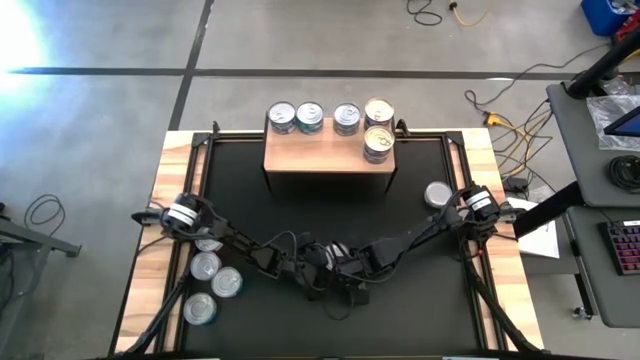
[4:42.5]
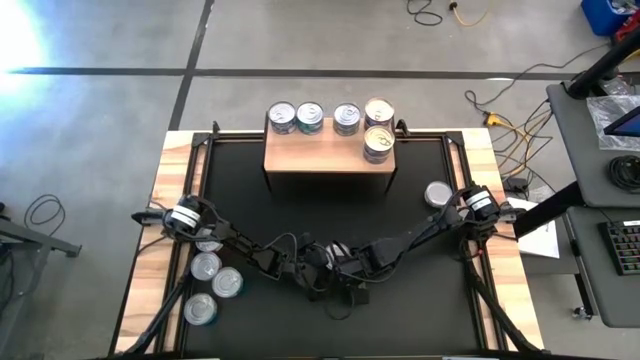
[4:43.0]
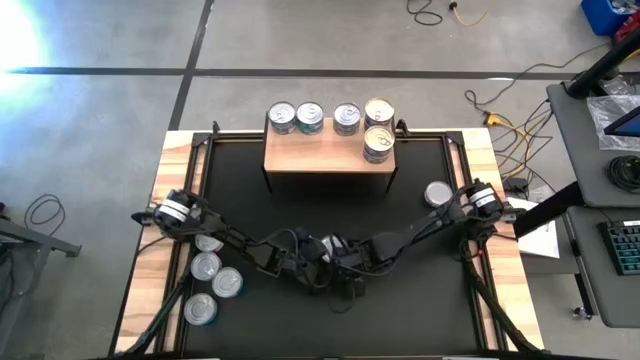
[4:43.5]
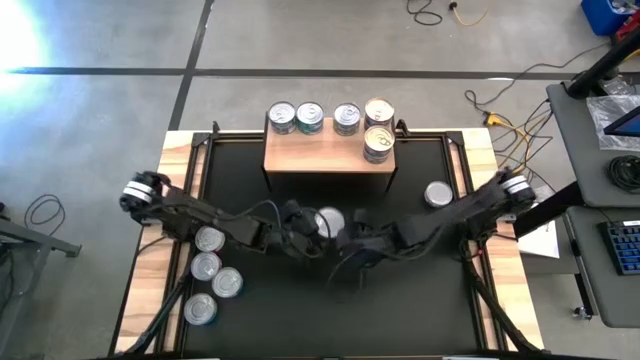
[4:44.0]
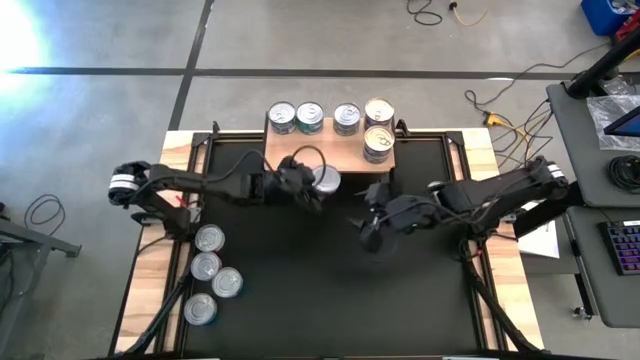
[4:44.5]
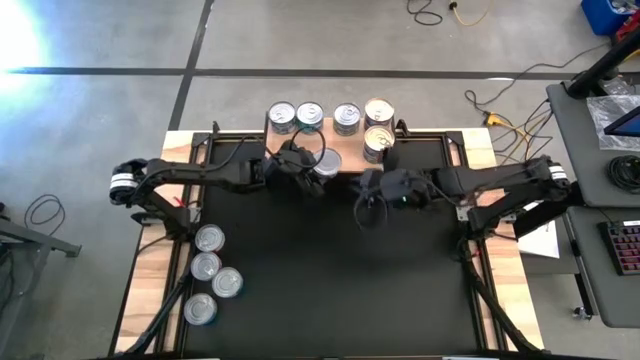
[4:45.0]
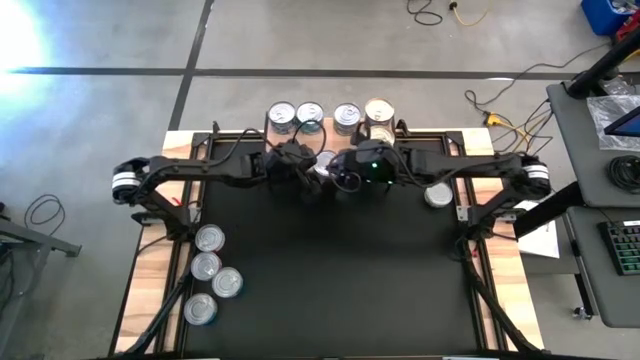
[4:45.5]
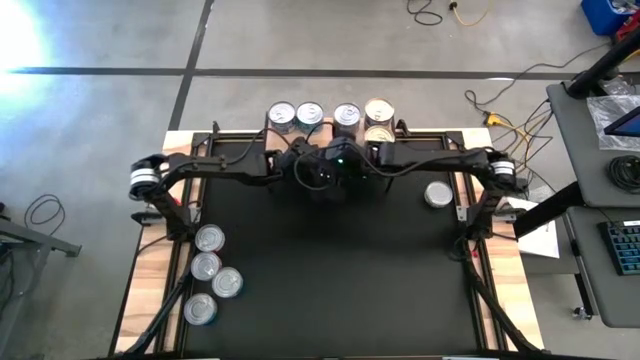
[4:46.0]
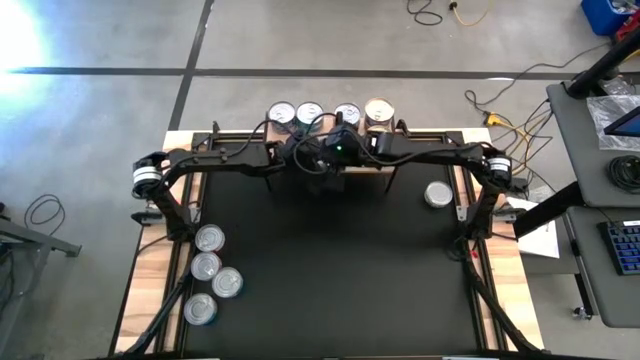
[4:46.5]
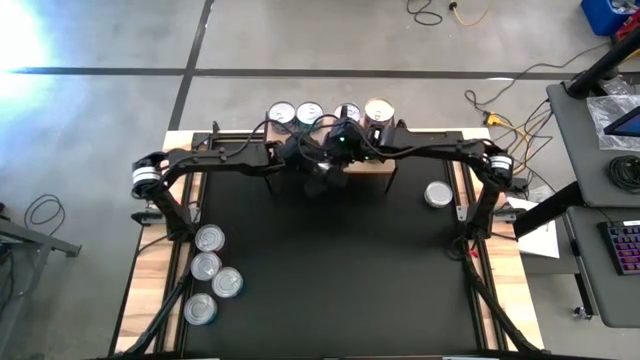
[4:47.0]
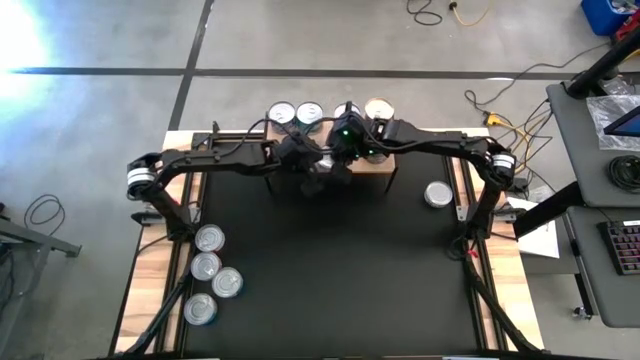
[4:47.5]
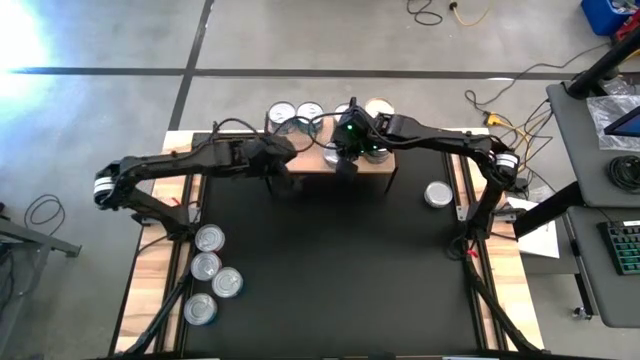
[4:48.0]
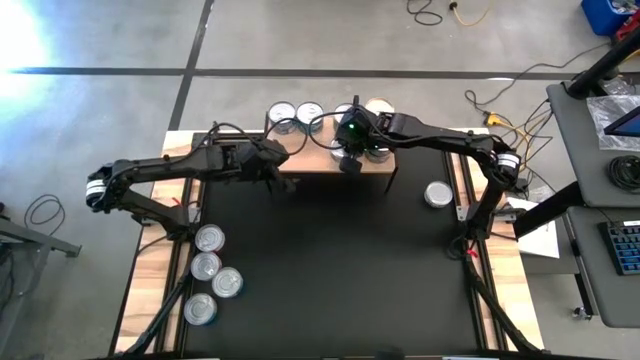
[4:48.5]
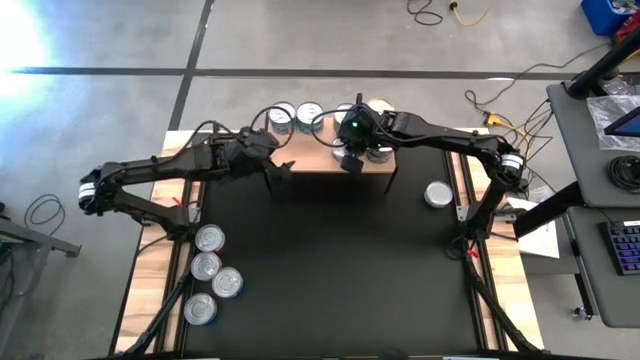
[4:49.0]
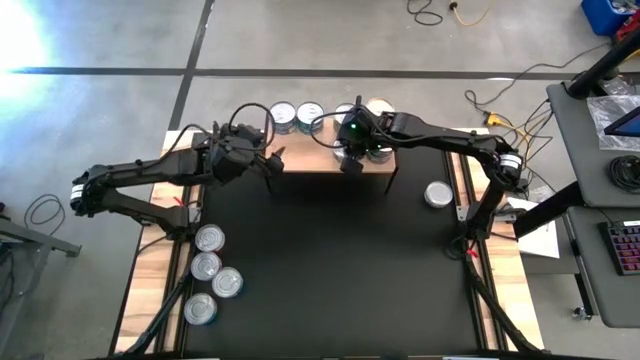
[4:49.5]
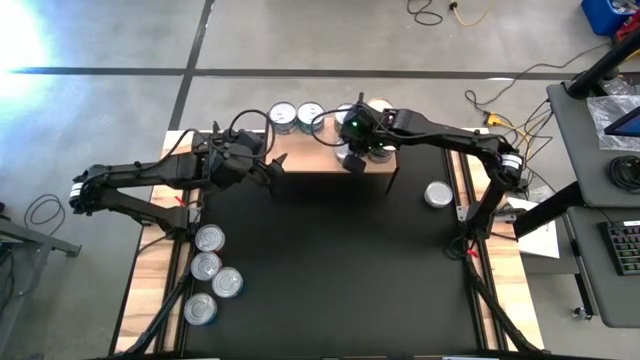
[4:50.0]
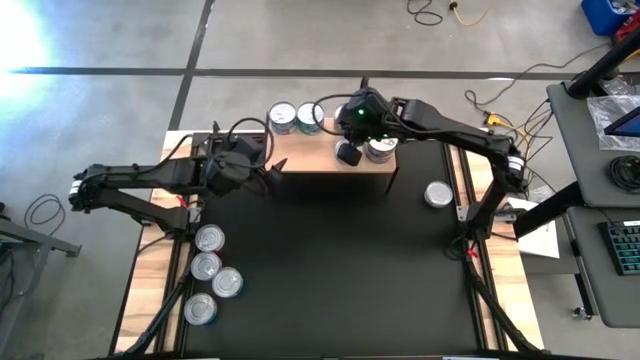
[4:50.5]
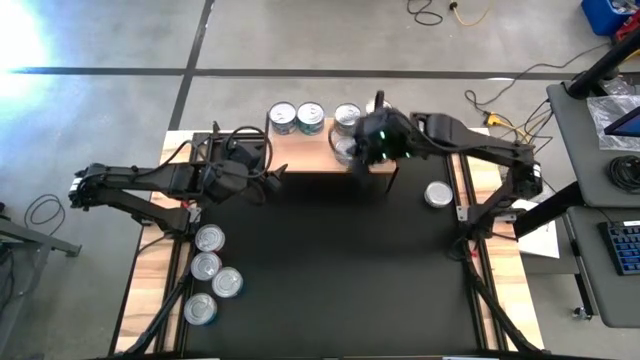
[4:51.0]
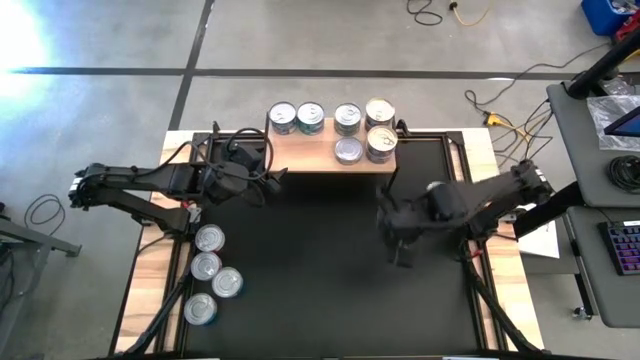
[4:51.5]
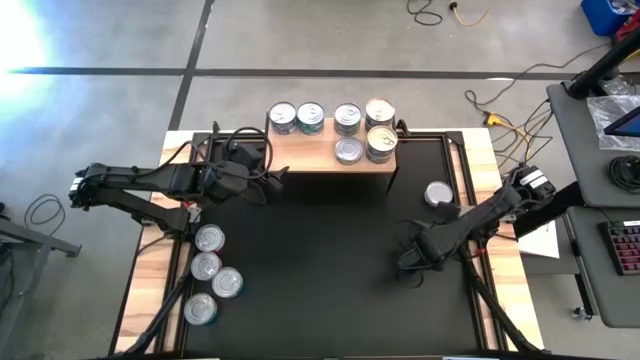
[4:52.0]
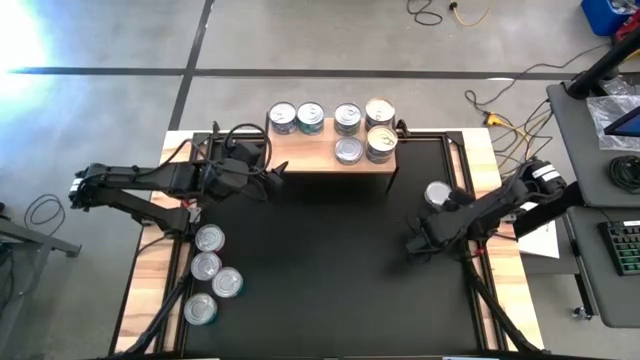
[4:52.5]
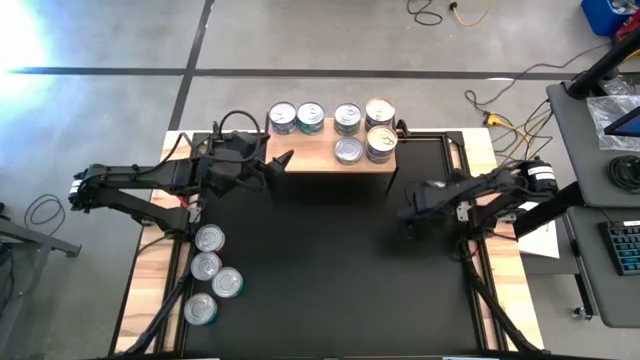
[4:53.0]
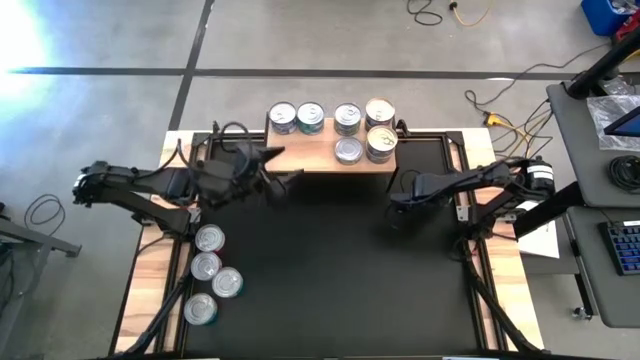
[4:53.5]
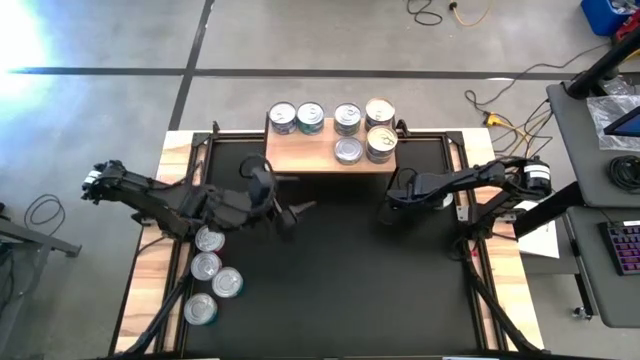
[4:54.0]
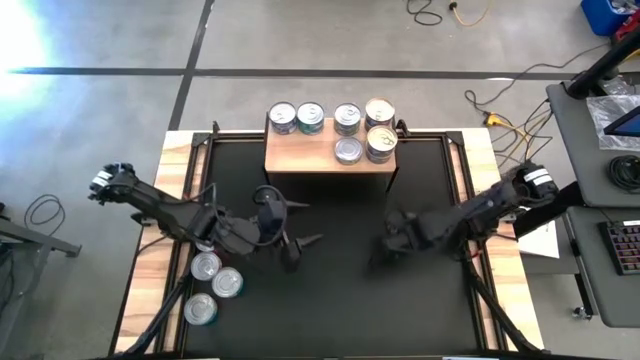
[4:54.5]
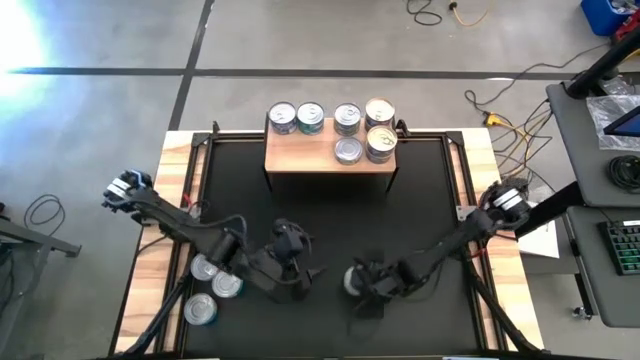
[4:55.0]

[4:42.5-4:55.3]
Task: Stack canned seafood by type on shelf
Put the bottom green tuna can on the shelf

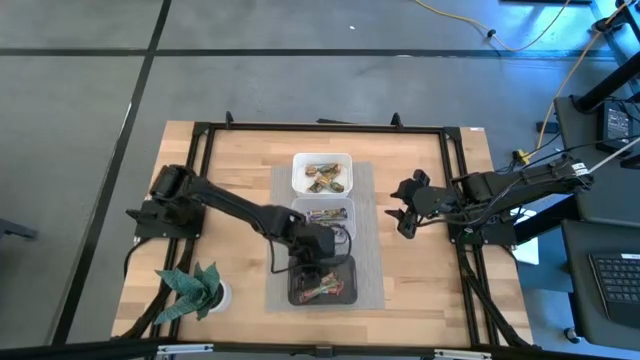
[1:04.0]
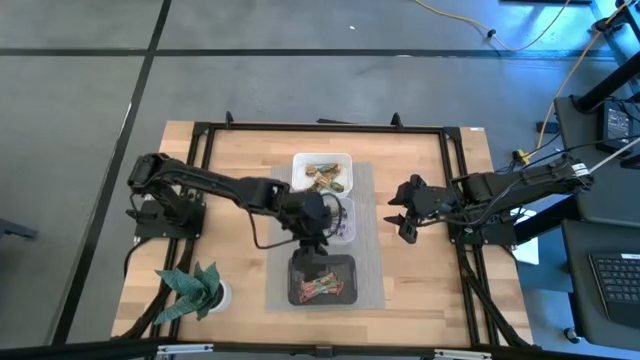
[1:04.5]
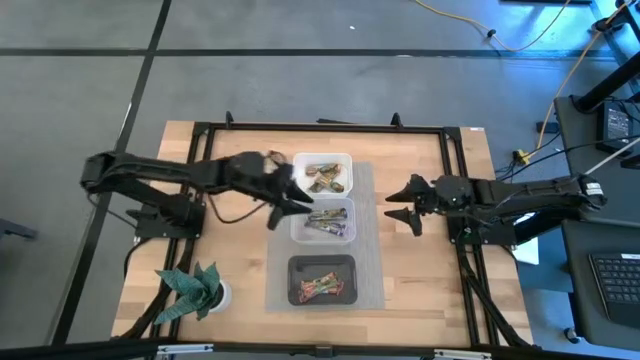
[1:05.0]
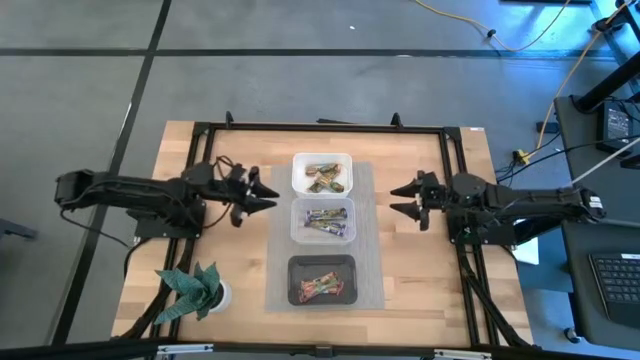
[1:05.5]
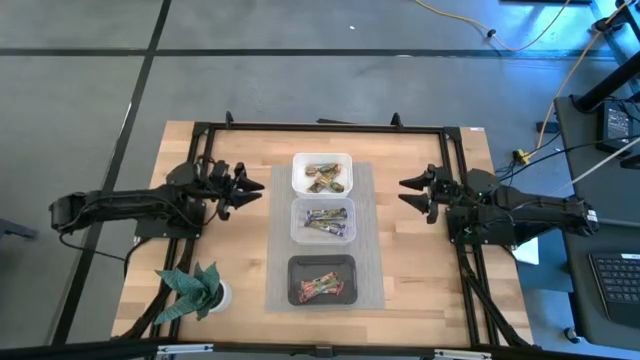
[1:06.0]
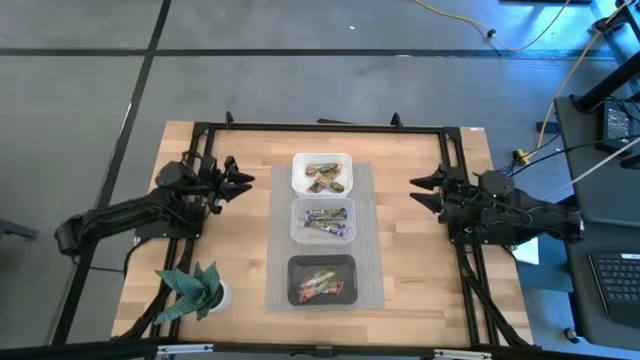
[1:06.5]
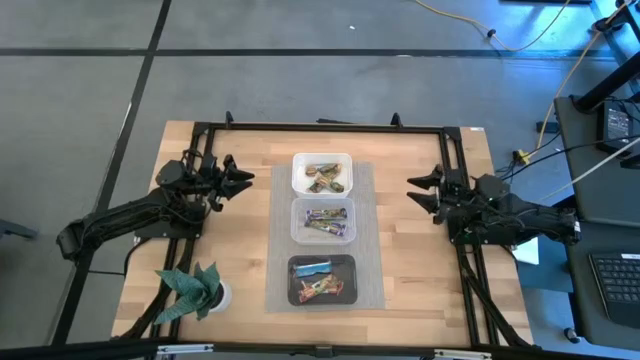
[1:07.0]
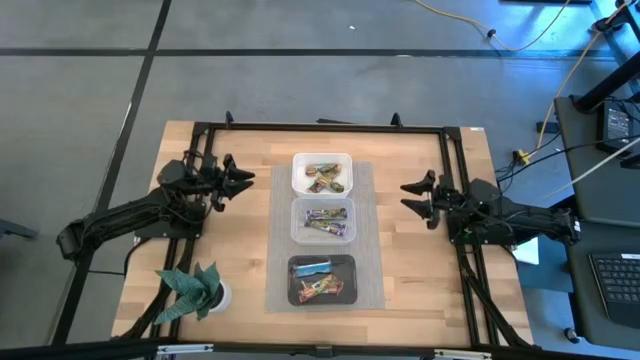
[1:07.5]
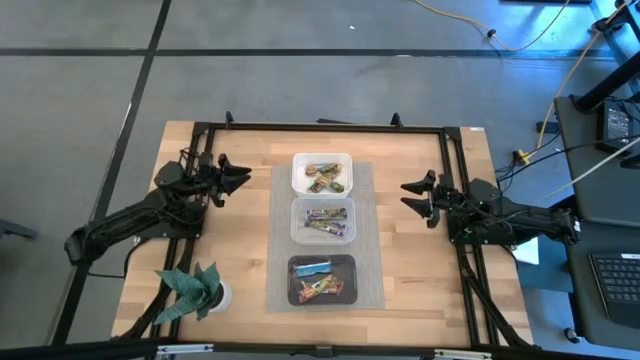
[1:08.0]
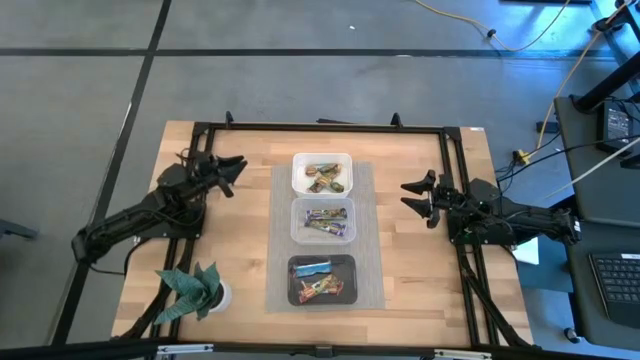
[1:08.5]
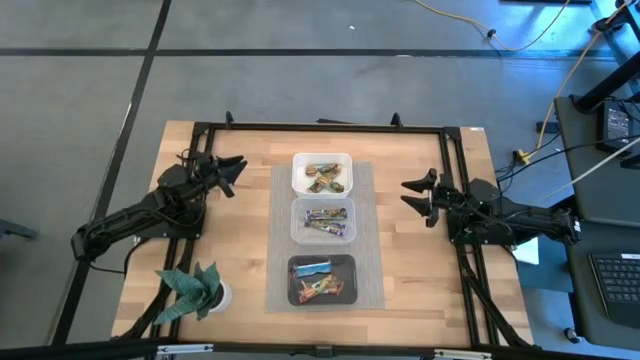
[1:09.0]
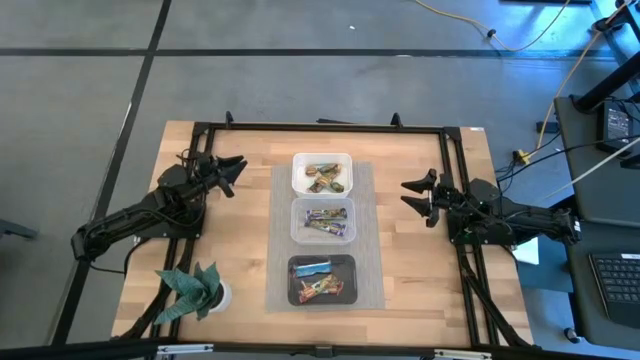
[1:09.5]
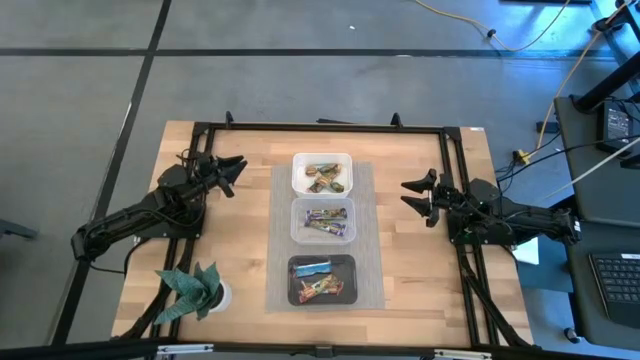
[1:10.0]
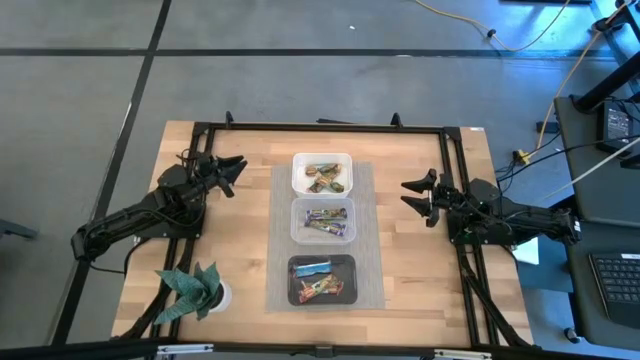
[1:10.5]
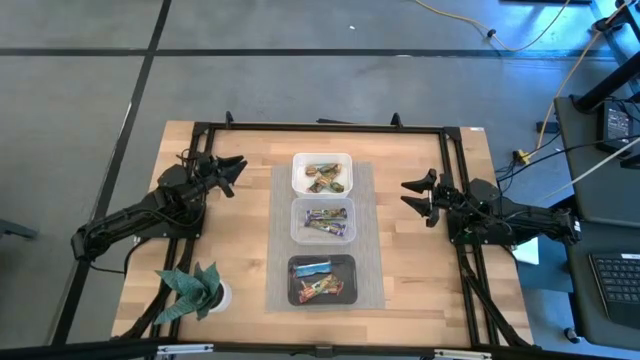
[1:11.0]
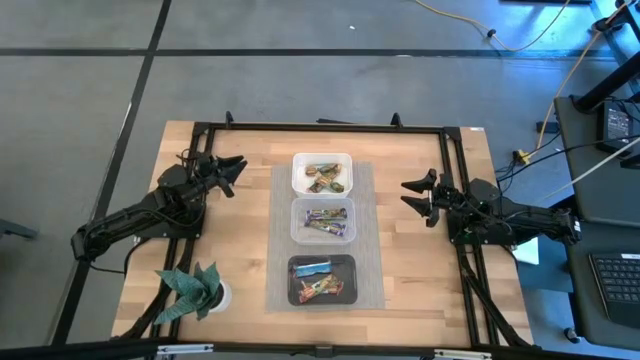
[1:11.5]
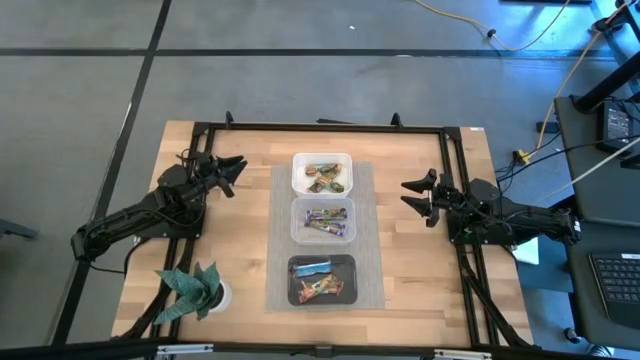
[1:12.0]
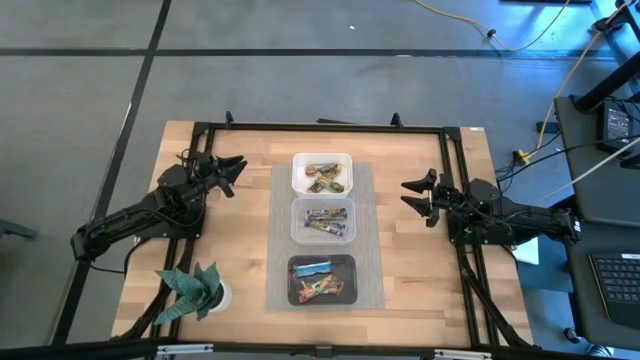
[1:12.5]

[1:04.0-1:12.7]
Task: Pick and place Granola Bars by type
Return to Home Position
